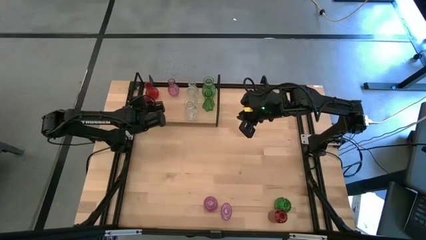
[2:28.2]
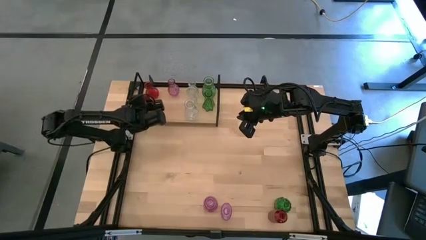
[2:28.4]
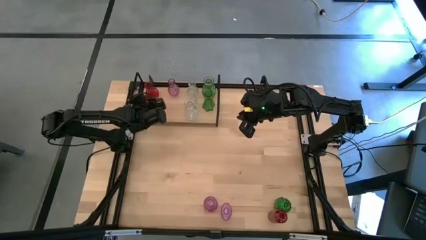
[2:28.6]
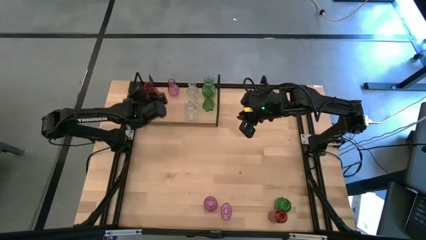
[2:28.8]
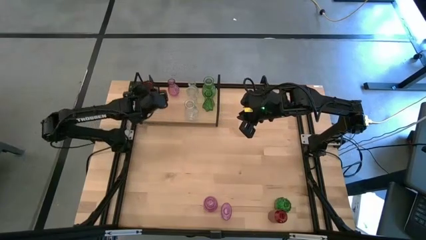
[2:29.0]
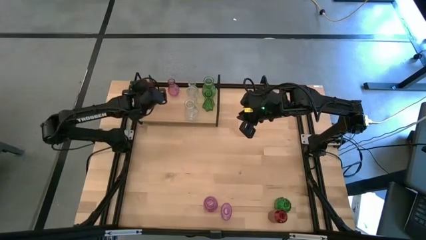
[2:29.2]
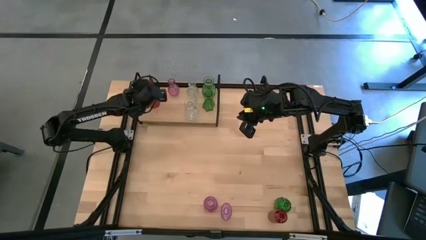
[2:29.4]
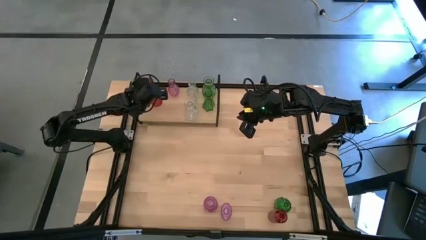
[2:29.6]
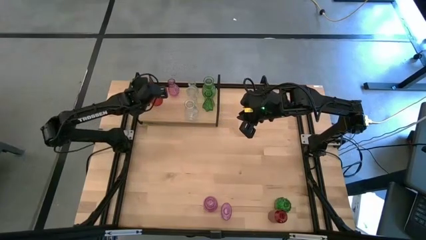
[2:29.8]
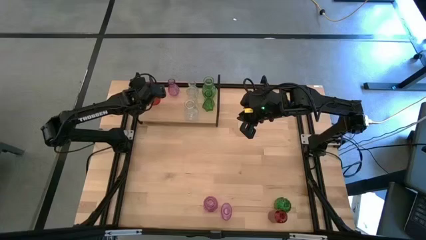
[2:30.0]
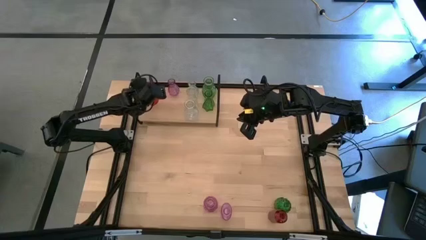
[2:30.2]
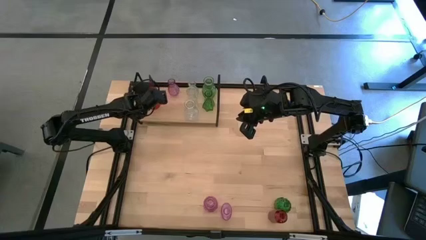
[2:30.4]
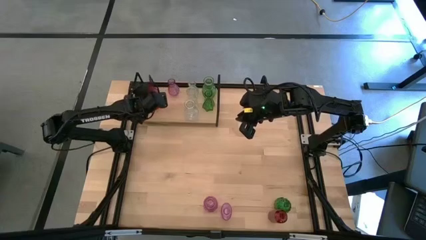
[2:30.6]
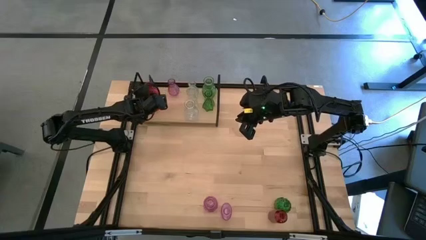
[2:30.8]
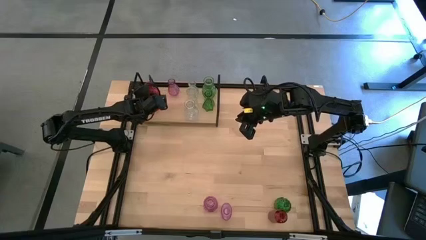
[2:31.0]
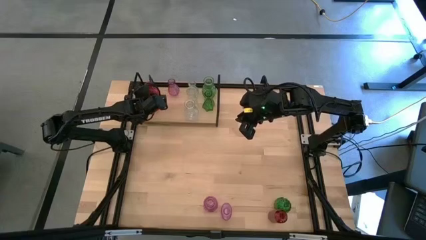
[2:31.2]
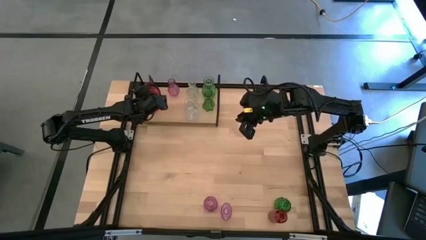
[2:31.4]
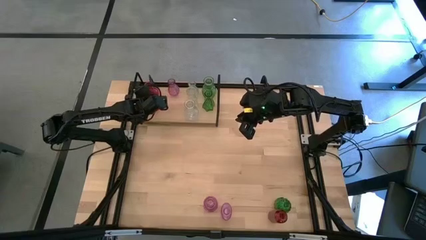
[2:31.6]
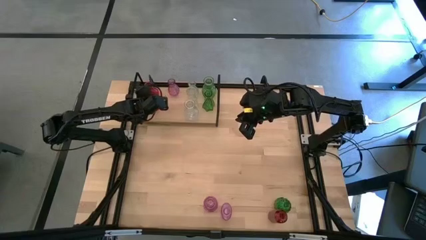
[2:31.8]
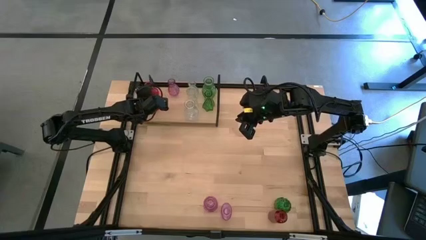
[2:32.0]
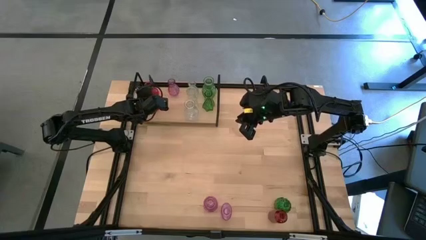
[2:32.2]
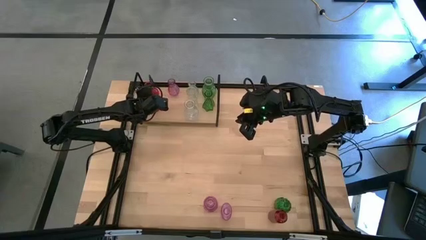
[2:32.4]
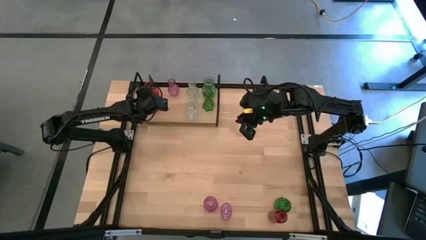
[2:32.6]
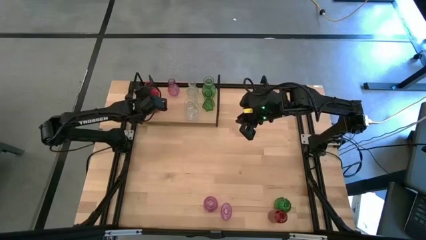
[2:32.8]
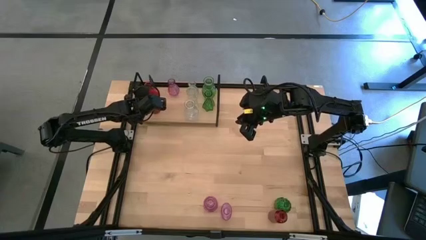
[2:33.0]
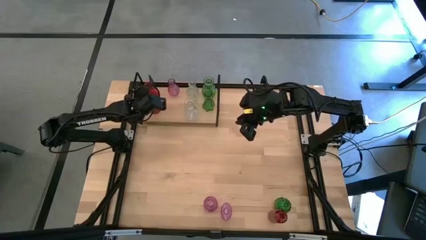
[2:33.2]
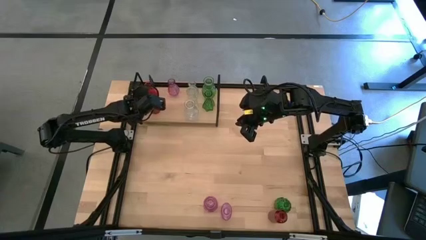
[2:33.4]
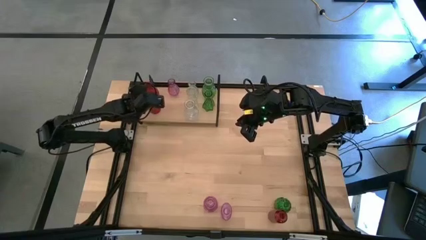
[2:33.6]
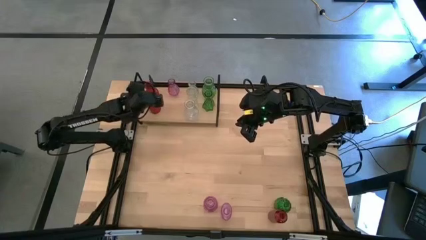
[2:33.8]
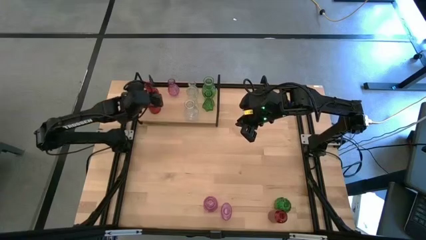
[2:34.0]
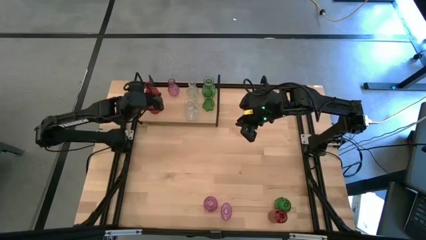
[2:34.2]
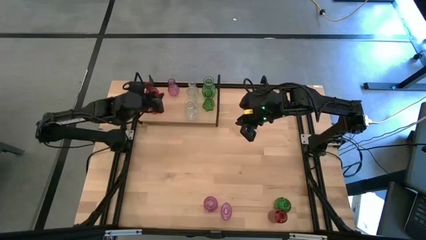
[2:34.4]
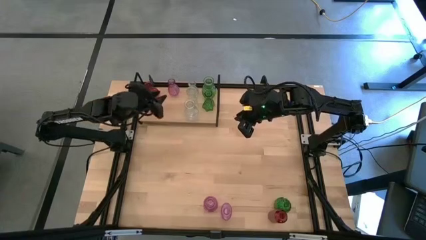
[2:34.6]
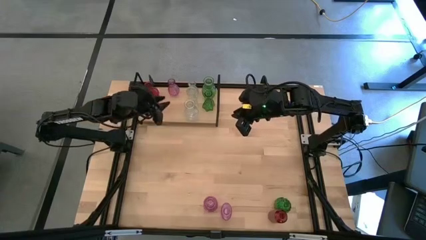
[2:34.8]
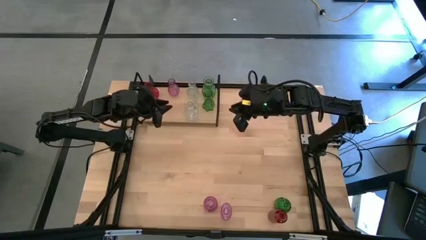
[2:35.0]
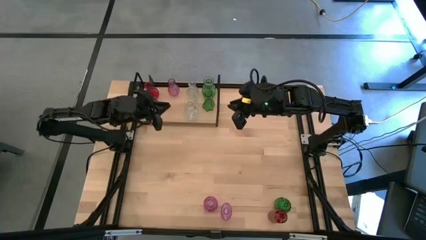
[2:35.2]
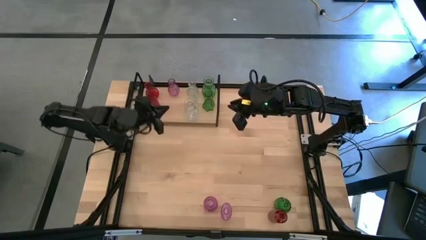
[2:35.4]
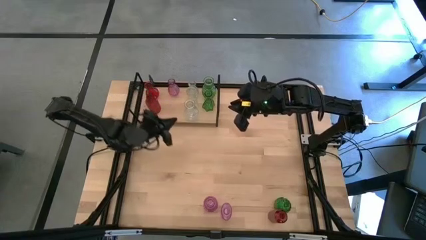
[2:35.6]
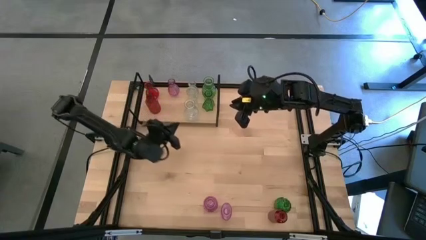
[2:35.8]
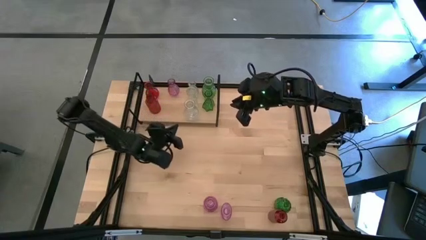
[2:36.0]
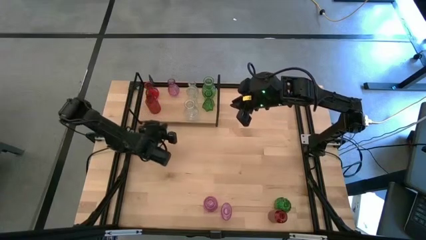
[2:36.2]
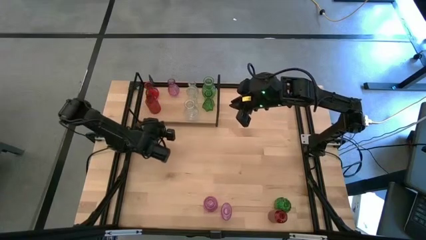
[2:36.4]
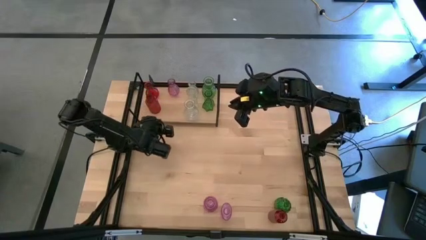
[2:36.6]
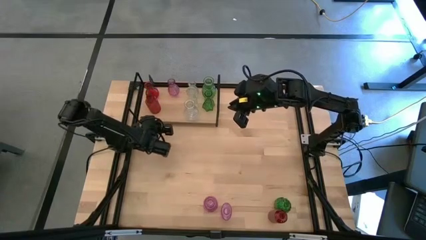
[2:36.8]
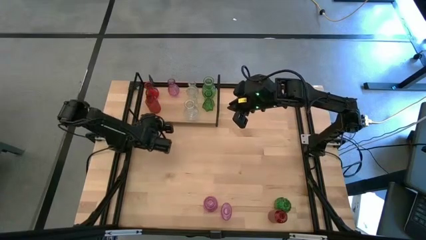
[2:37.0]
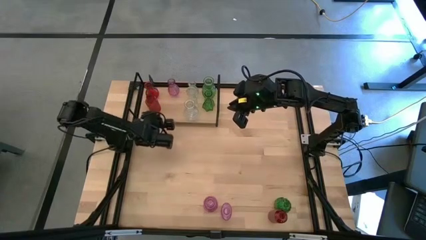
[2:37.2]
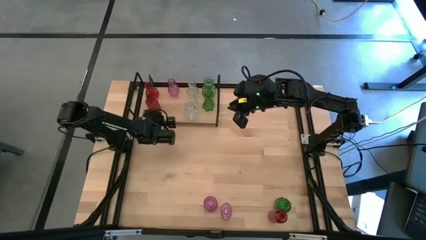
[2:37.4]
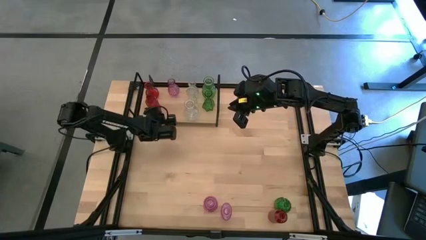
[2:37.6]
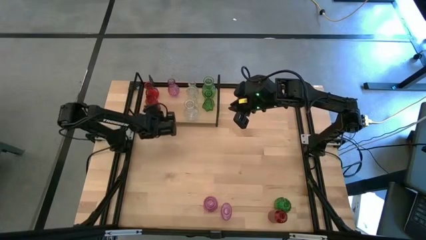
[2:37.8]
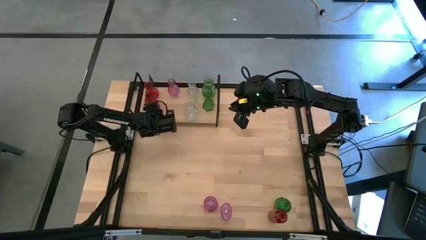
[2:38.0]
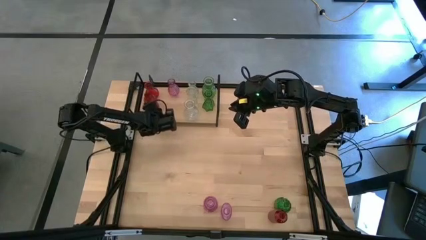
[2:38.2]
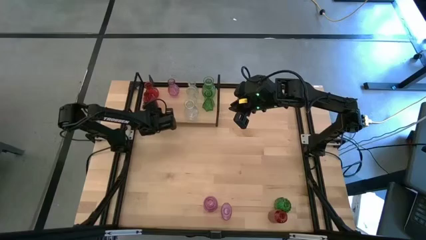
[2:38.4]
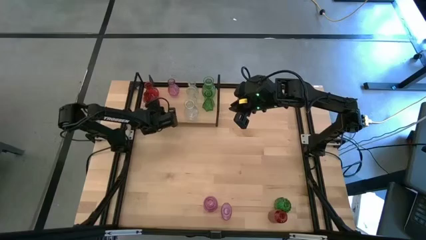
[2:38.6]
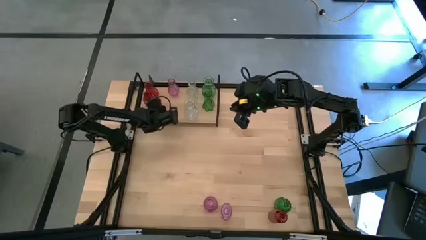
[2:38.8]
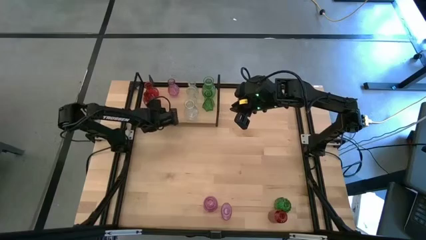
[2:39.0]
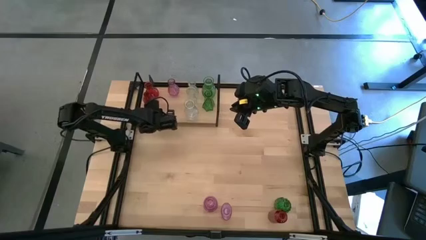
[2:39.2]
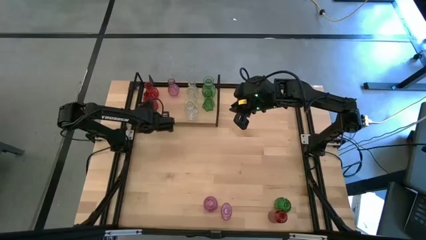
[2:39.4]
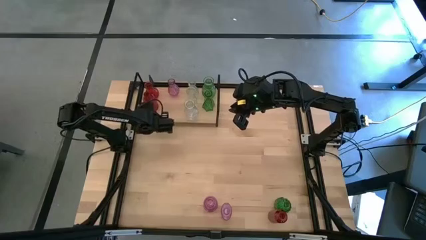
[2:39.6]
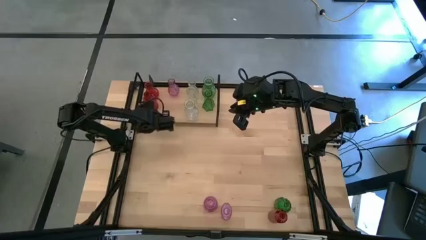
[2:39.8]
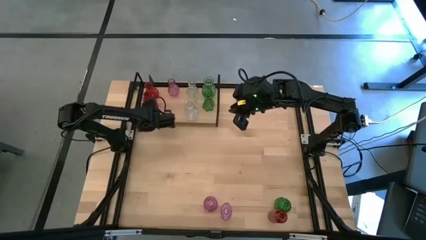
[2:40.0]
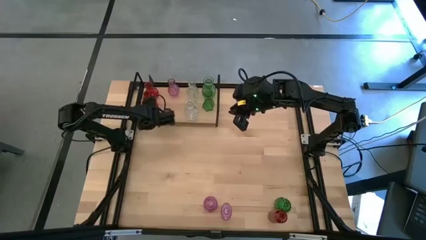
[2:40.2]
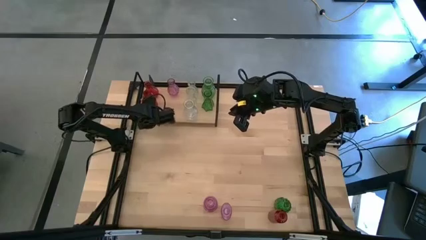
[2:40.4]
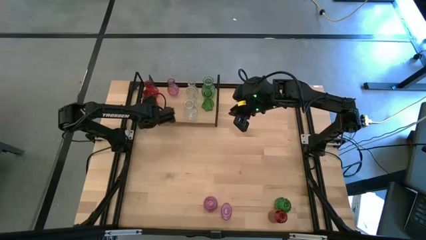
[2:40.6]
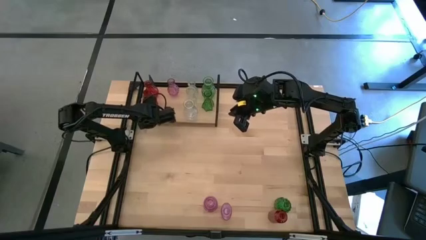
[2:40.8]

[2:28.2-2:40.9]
Task: sort vases onto shelf
Put the top red vase on the shelf aligned with the other red vase

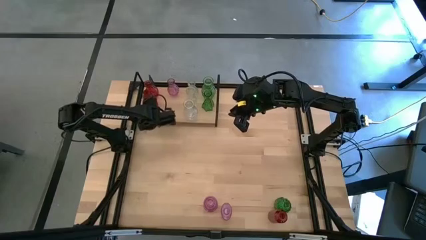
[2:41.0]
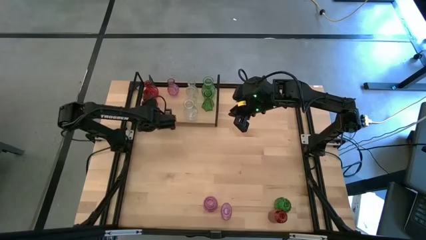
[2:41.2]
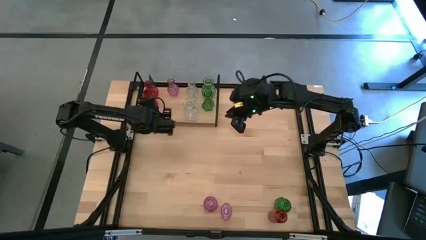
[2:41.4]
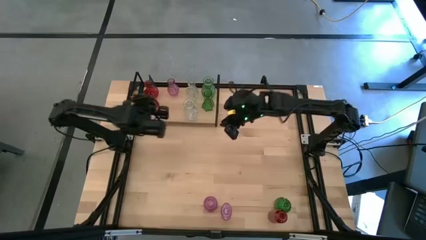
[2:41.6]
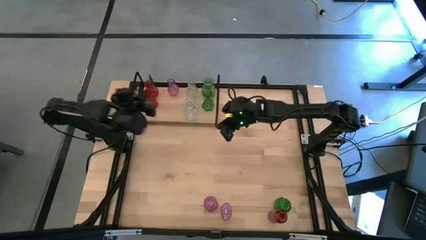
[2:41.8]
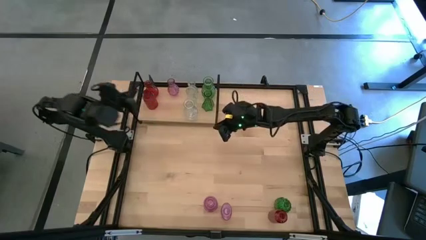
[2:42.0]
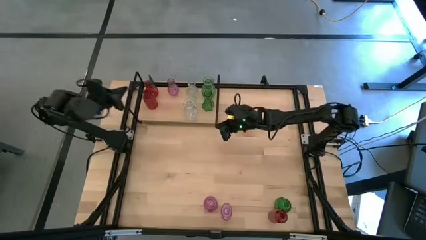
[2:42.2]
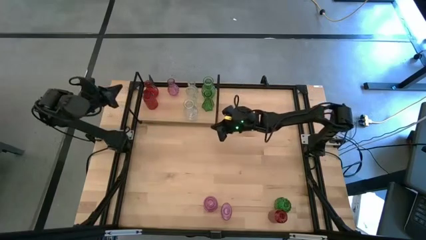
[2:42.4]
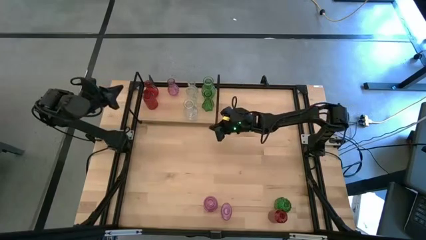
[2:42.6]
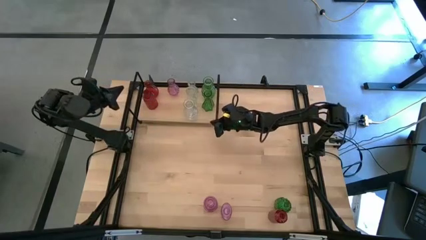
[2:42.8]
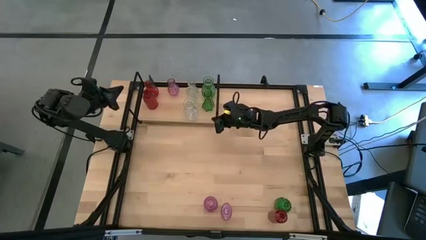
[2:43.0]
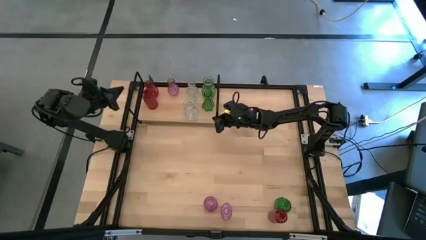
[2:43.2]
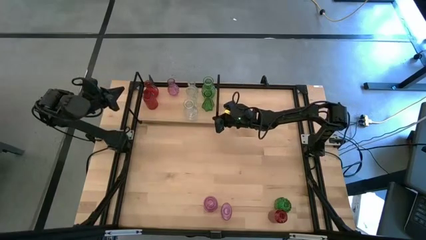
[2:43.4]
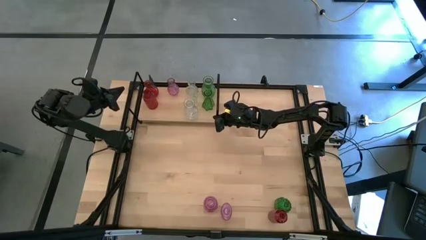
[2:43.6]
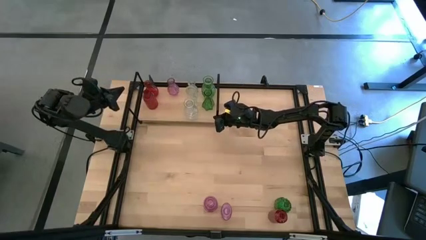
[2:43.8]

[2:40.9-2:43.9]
Adjust the shelf

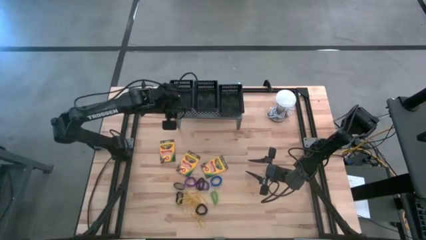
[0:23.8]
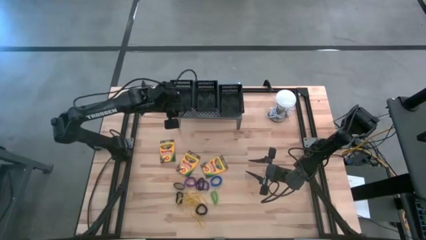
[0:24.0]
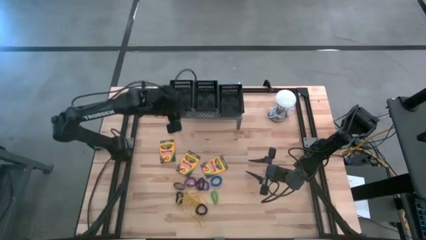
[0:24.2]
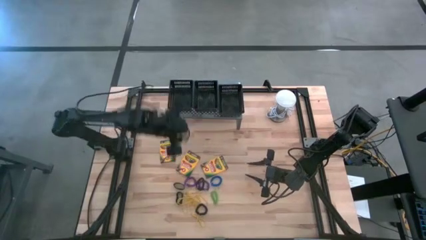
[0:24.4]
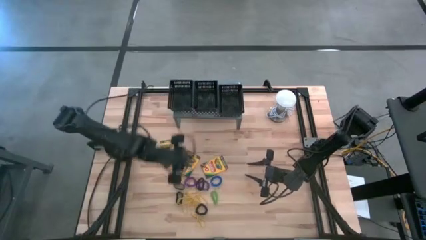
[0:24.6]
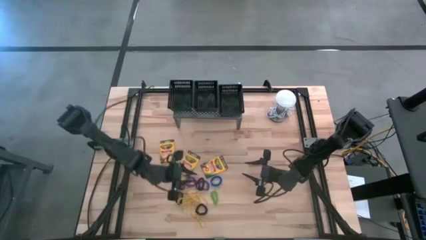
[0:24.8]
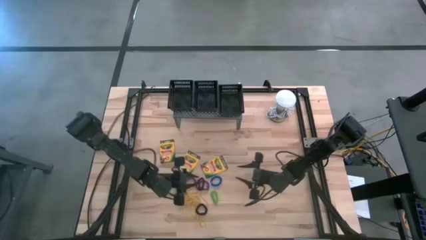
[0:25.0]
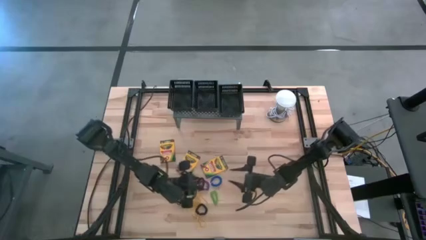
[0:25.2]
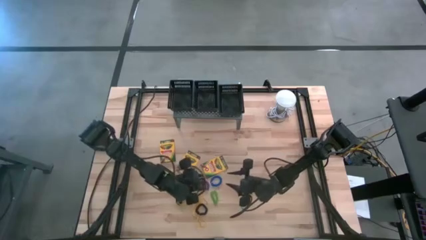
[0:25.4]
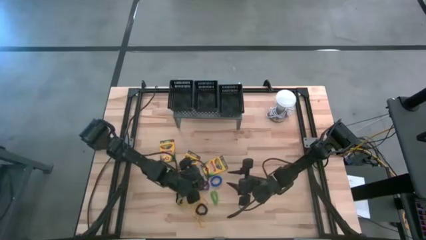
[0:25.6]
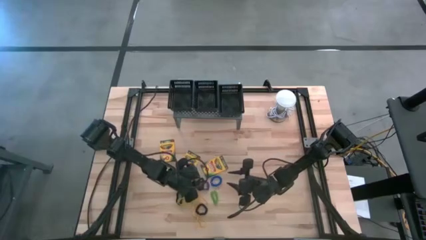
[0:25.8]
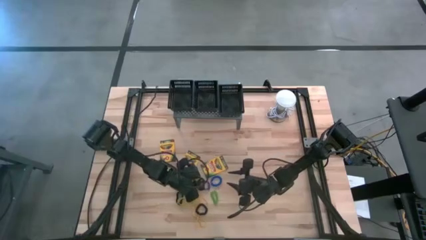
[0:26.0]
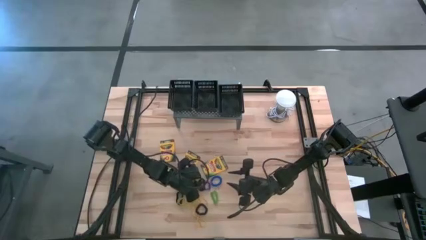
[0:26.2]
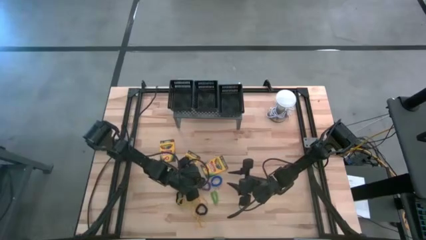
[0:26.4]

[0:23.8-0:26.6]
Task: Pick & Place Office Desk Supplies
Put the black spring keychain into the left black bin on the shelf
